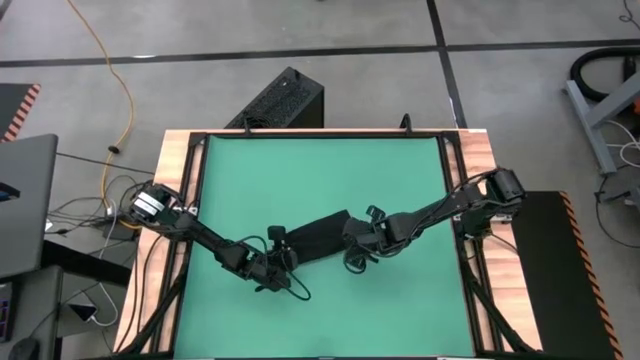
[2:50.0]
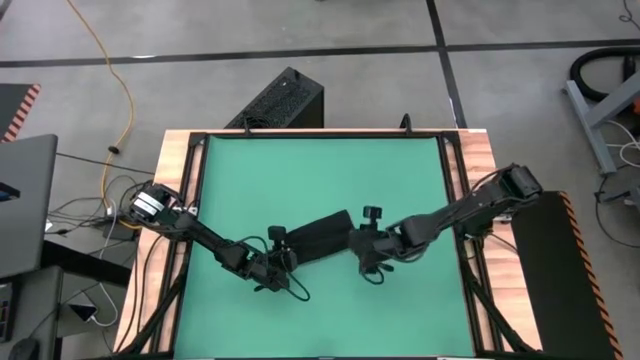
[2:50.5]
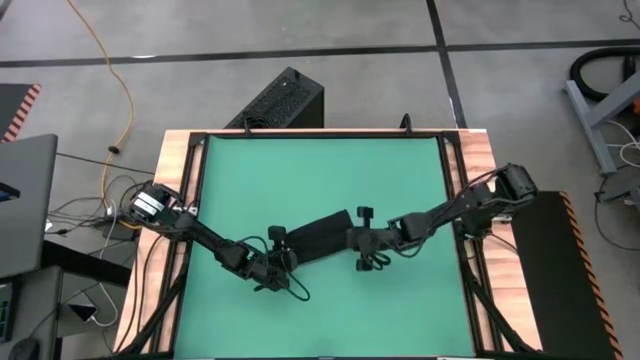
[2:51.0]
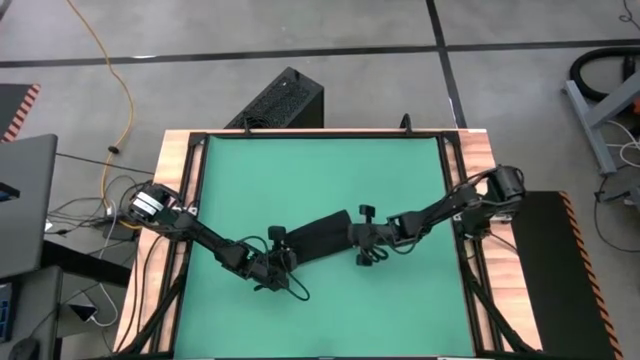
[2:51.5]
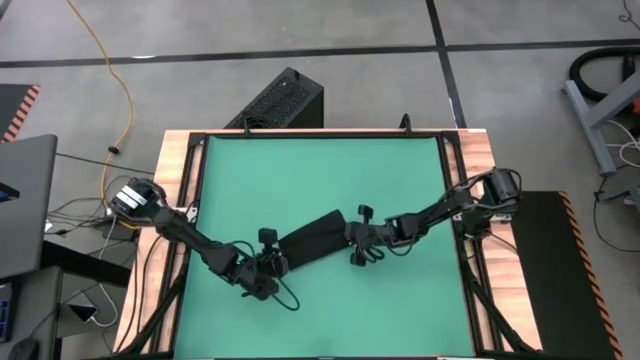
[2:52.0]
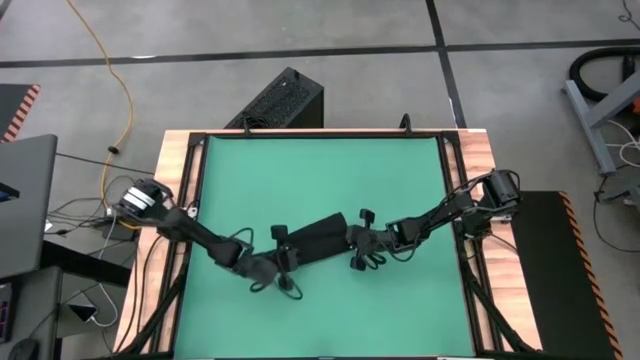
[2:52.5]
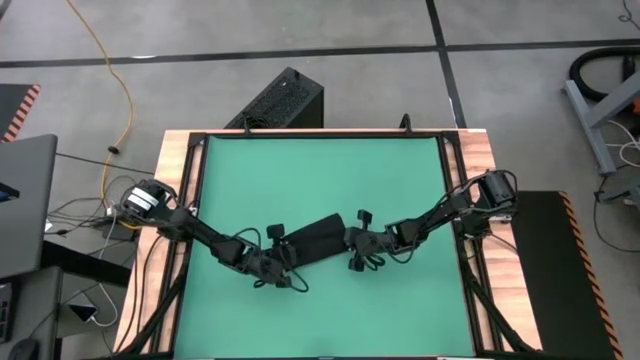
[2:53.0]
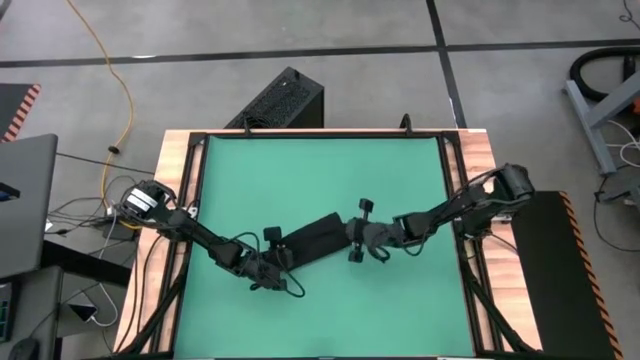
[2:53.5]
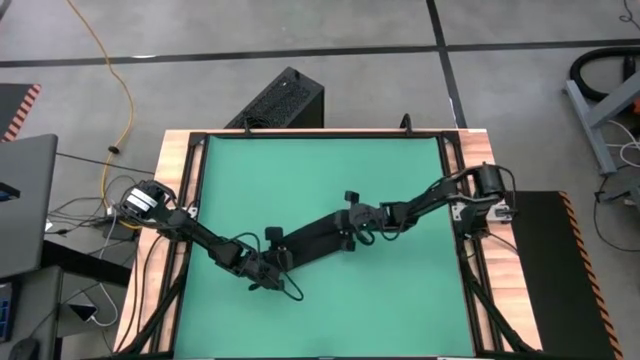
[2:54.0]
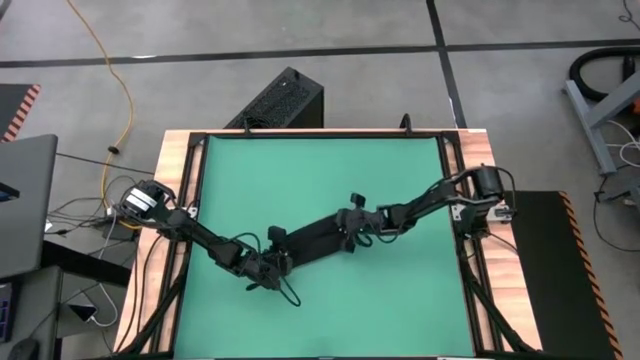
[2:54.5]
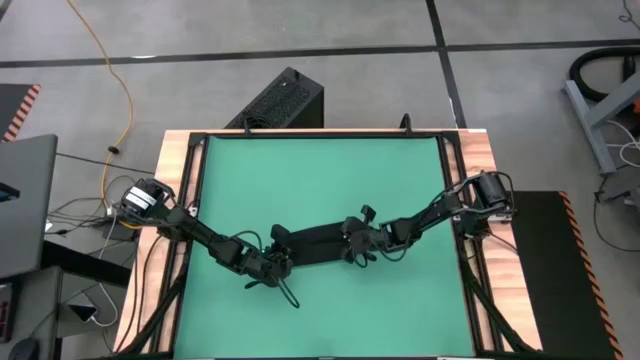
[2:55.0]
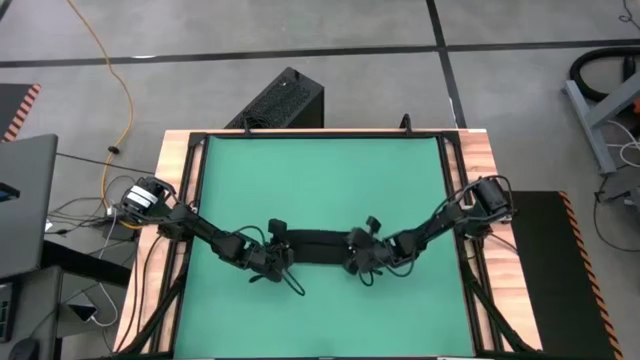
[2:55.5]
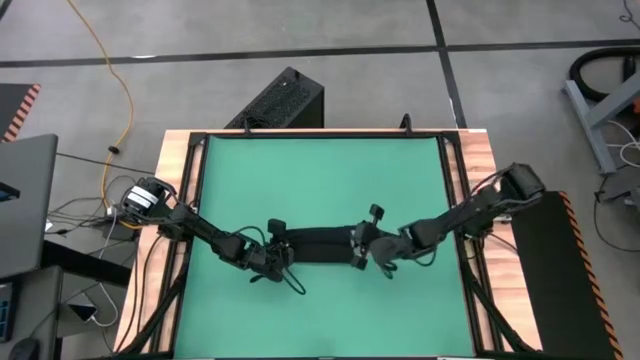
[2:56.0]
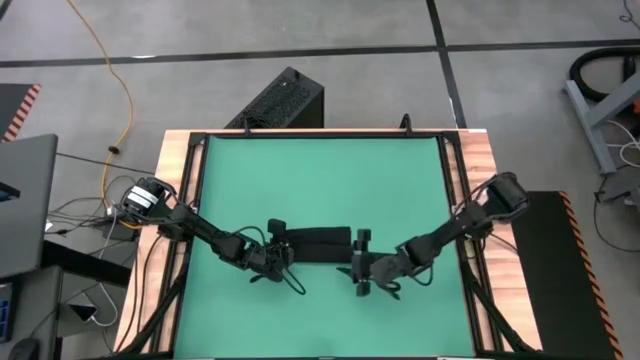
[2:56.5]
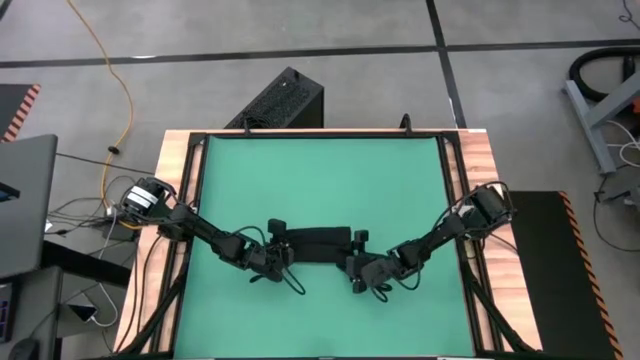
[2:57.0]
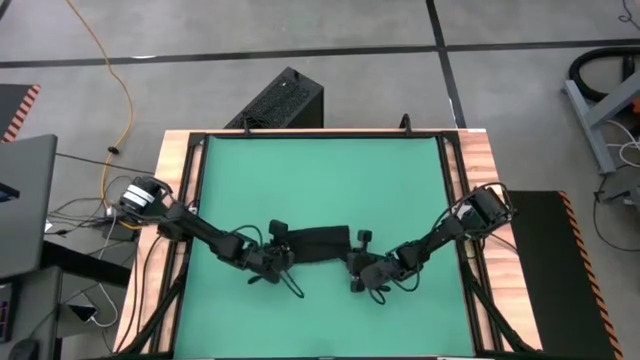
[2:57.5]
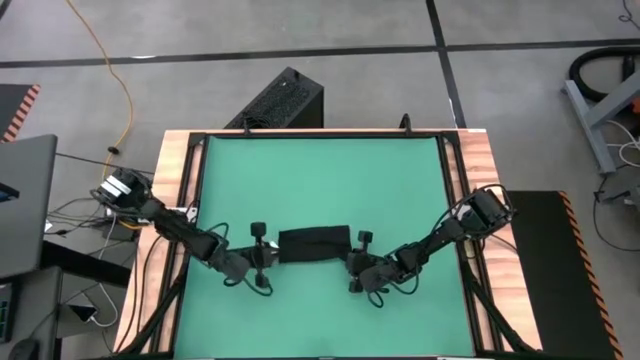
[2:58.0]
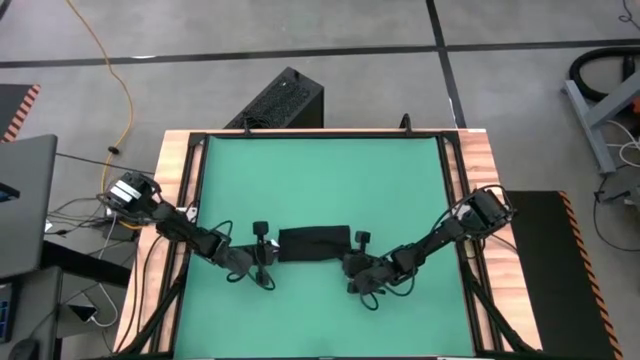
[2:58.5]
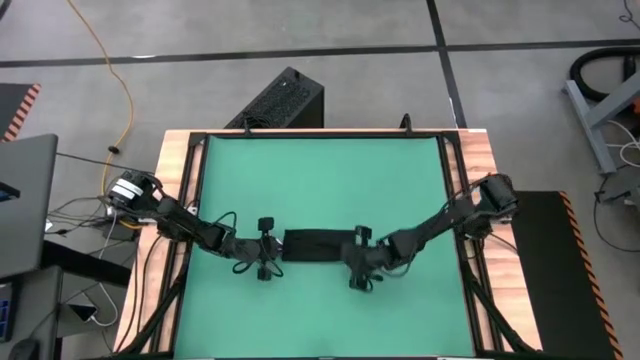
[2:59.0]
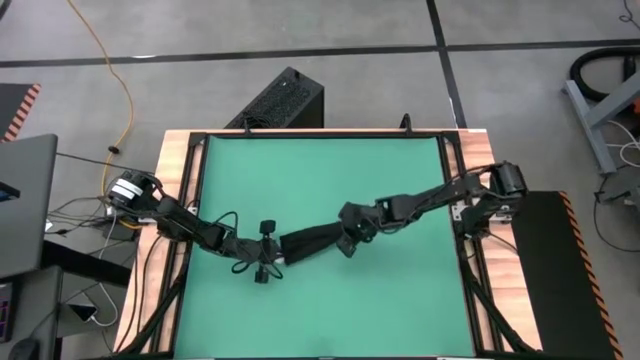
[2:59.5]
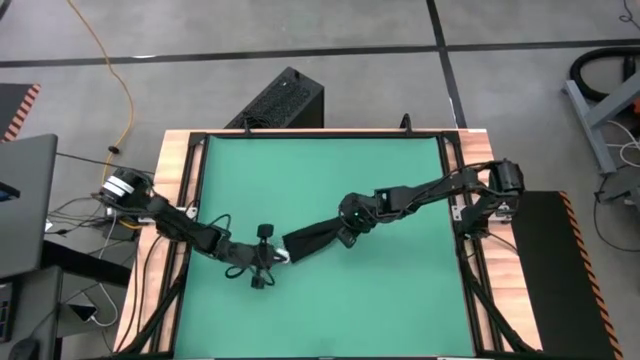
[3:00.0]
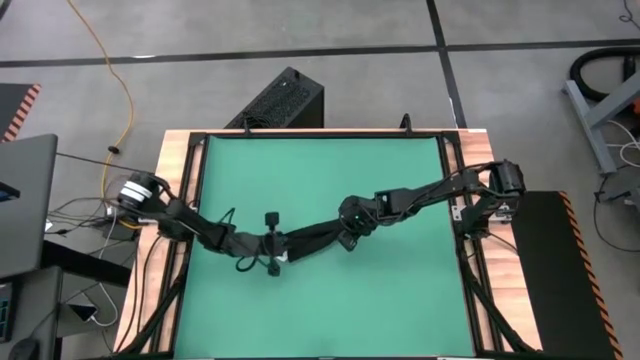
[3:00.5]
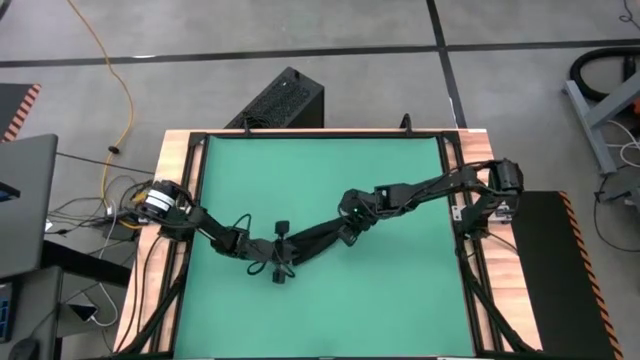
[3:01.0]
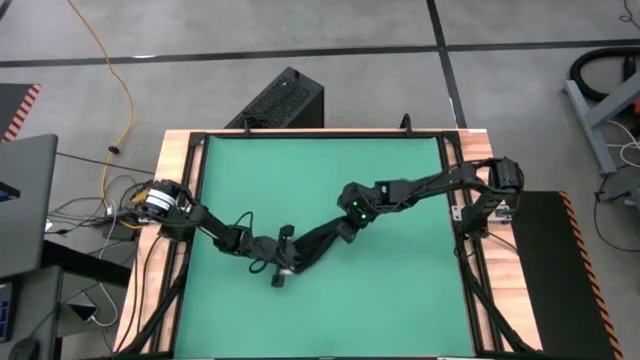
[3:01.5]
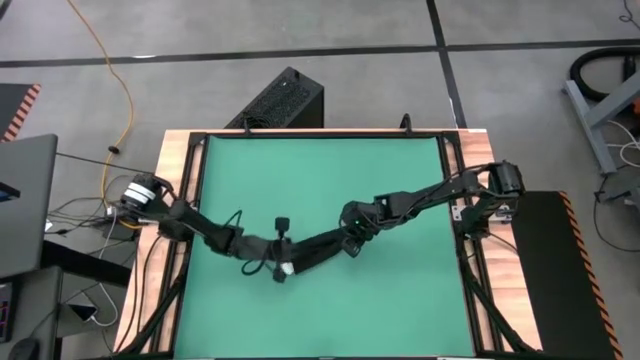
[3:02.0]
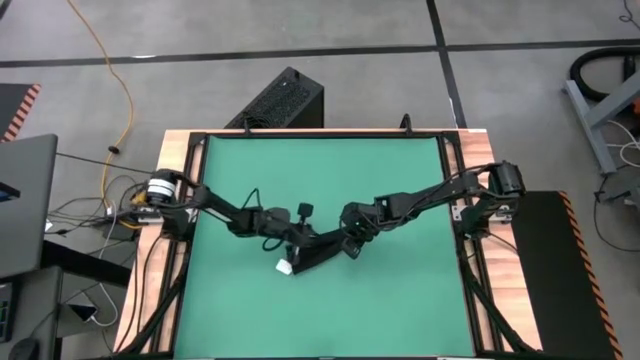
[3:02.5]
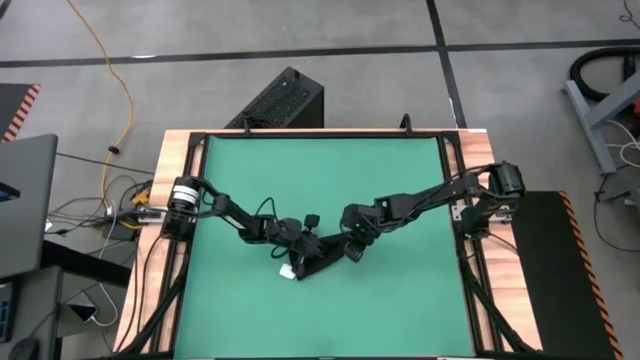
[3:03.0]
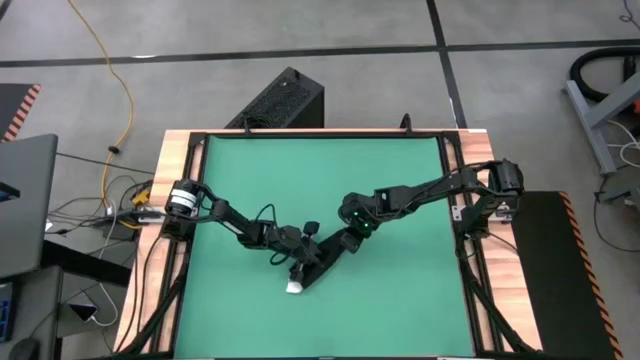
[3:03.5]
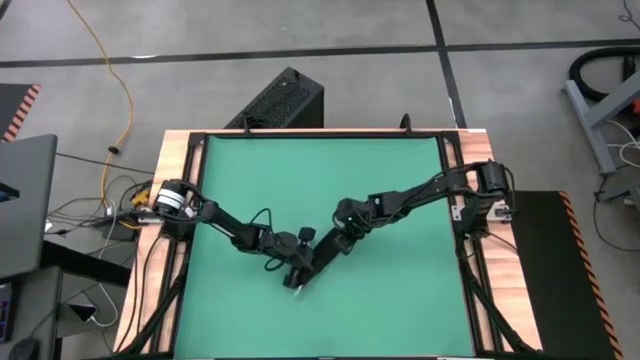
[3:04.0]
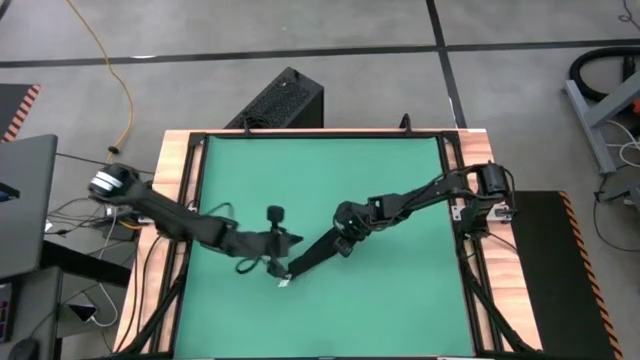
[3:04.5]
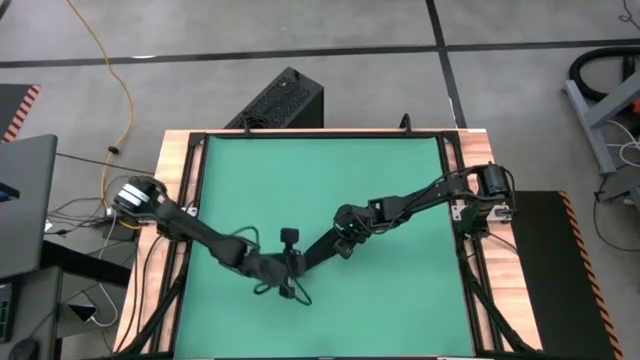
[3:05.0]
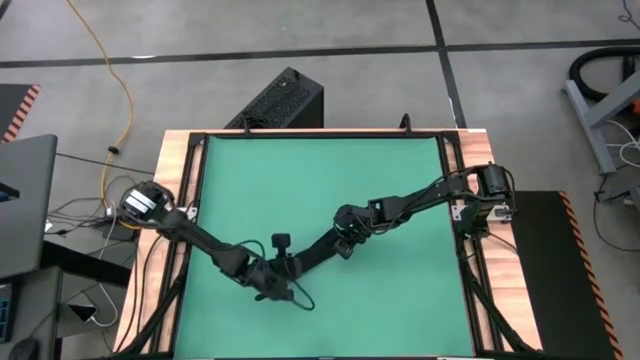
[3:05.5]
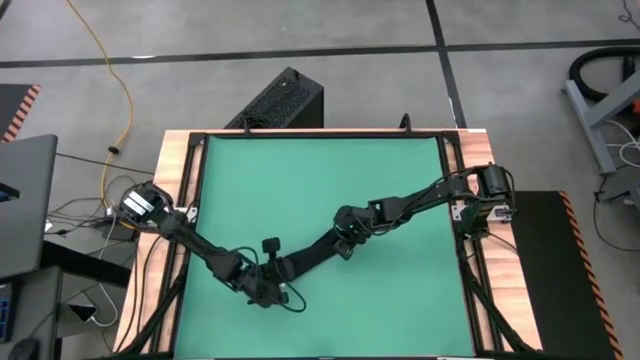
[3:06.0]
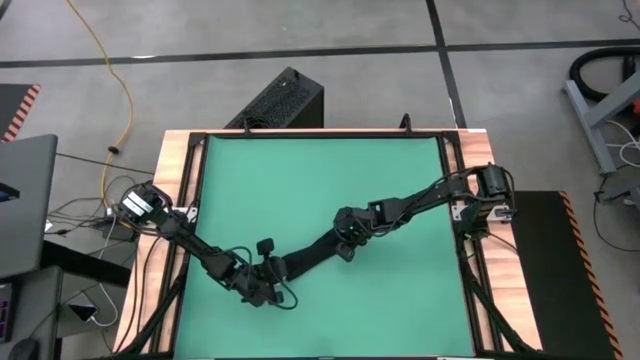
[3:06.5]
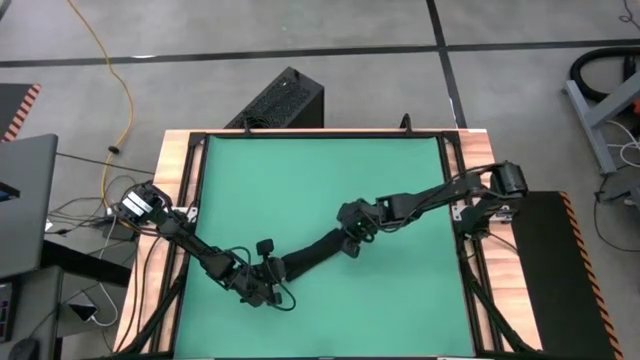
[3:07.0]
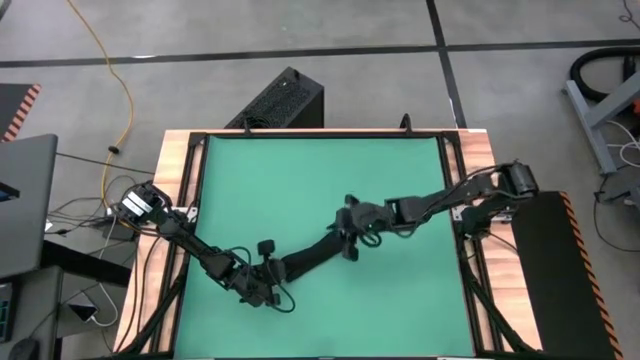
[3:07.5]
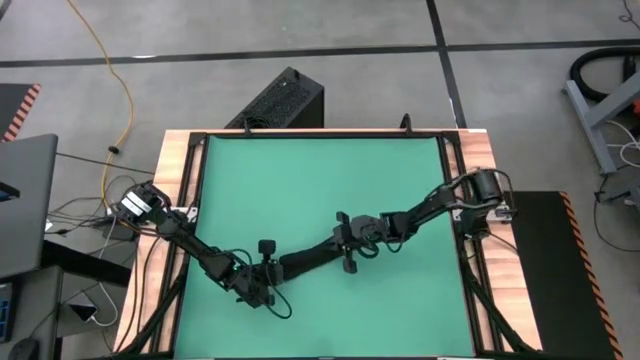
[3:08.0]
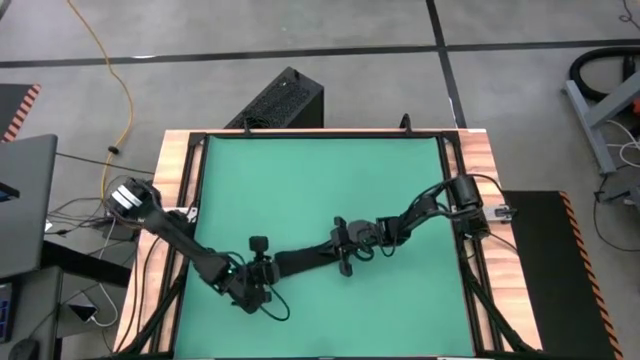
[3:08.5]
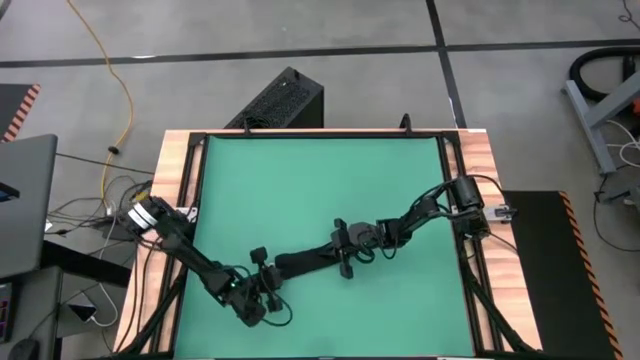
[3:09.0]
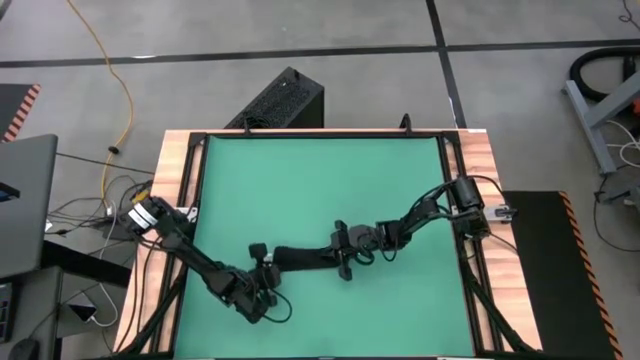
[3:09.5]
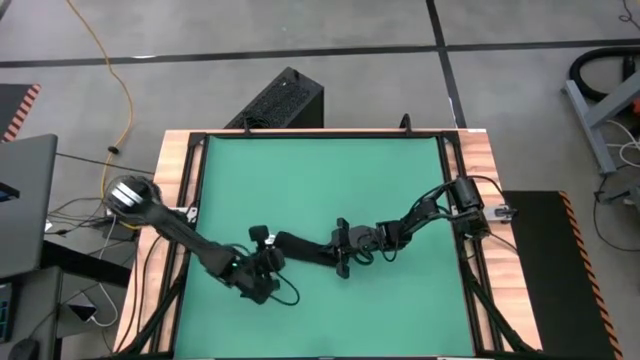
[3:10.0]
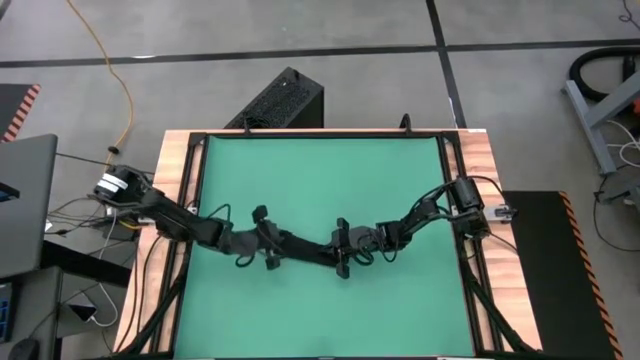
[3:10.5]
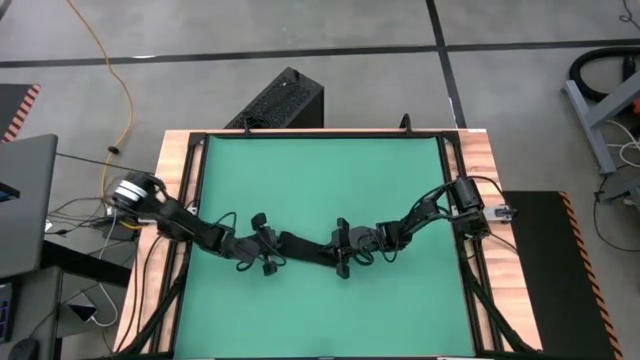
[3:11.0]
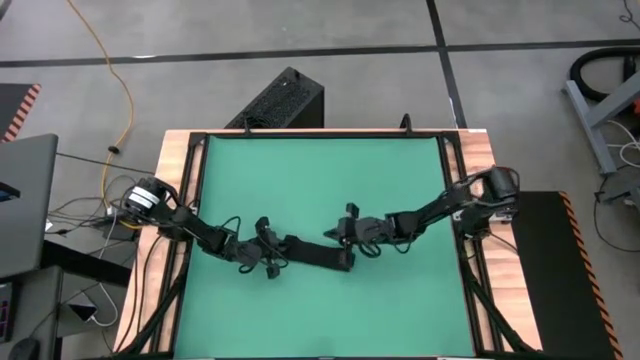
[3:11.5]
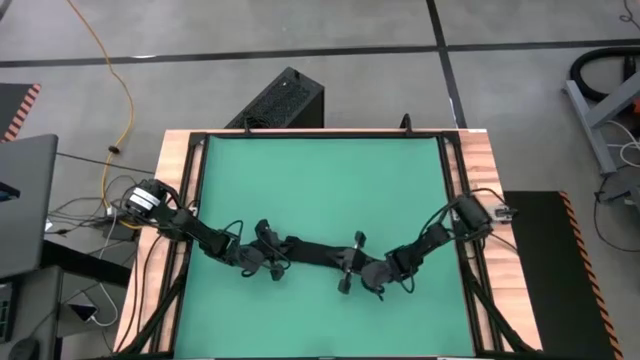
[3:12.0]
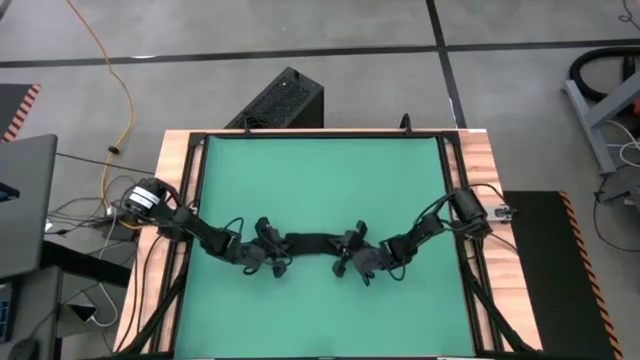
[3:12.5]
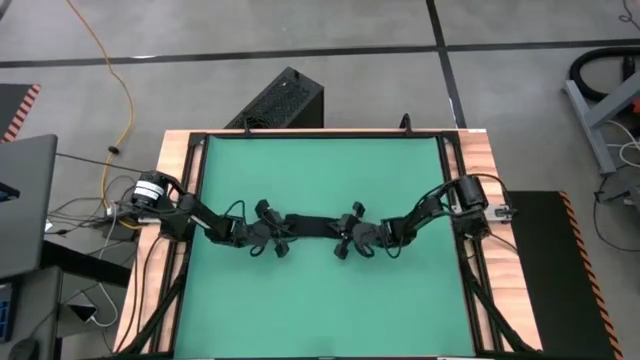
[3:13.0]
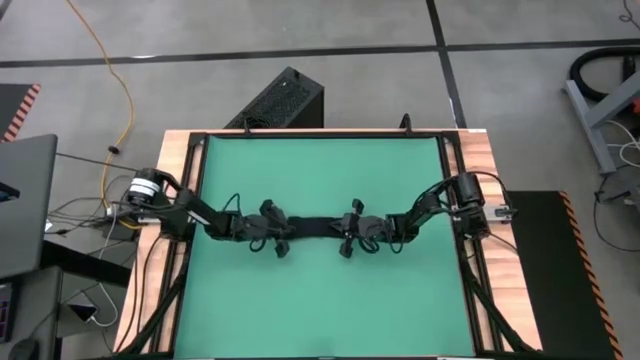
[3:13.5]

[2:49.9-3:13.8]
Task: Roll towel into tight, uniform cylinder
Roll the black towel
